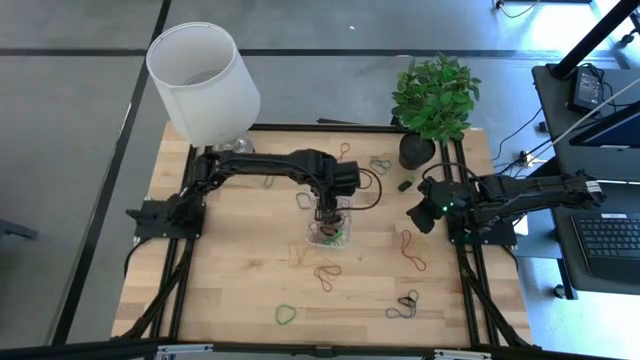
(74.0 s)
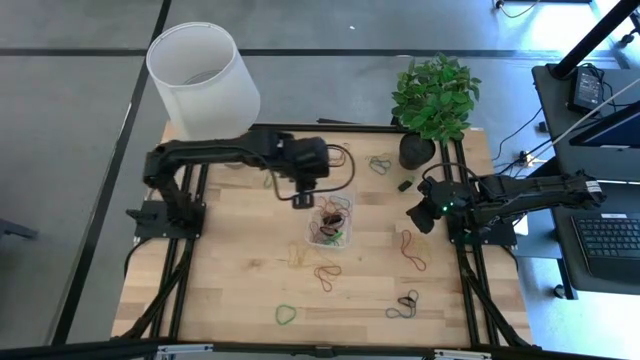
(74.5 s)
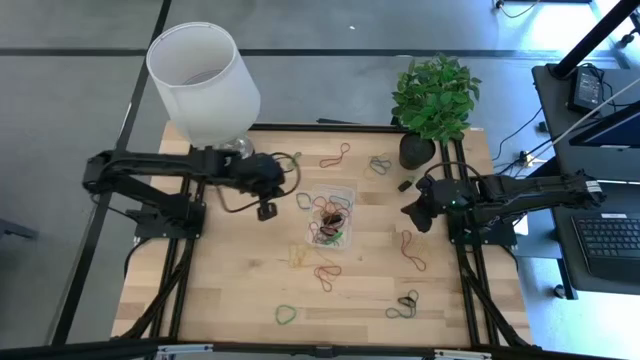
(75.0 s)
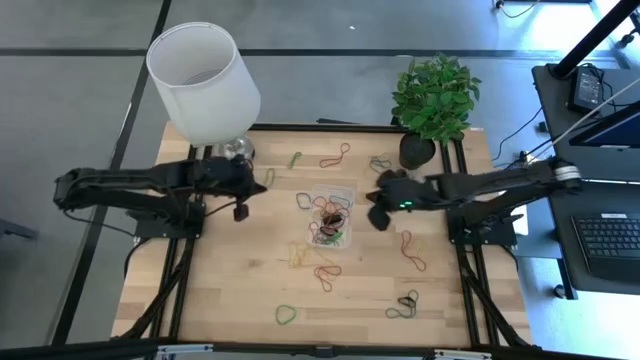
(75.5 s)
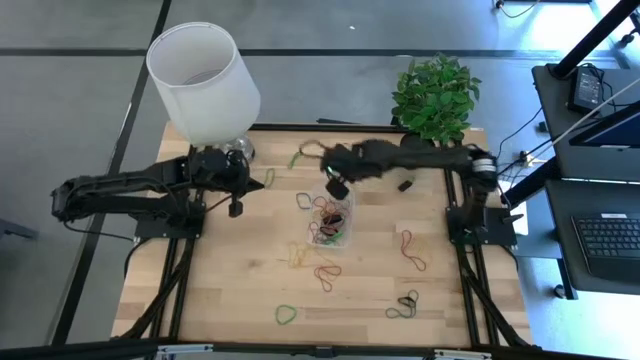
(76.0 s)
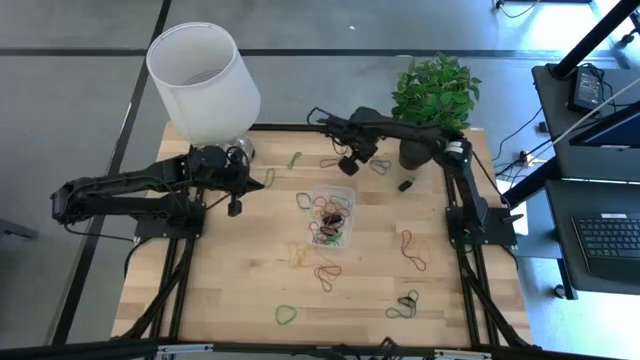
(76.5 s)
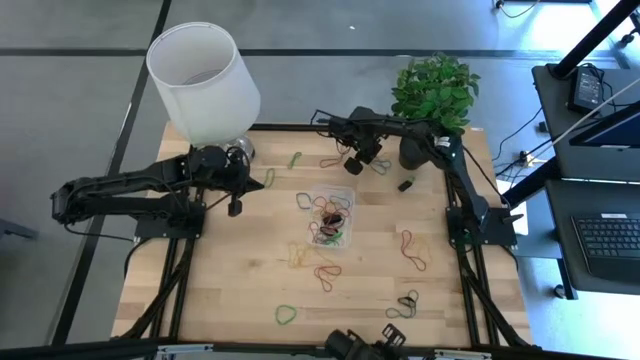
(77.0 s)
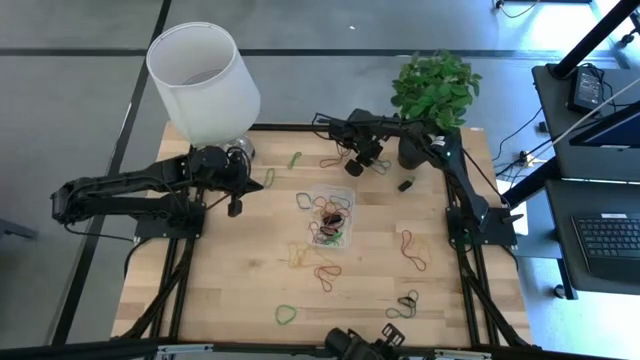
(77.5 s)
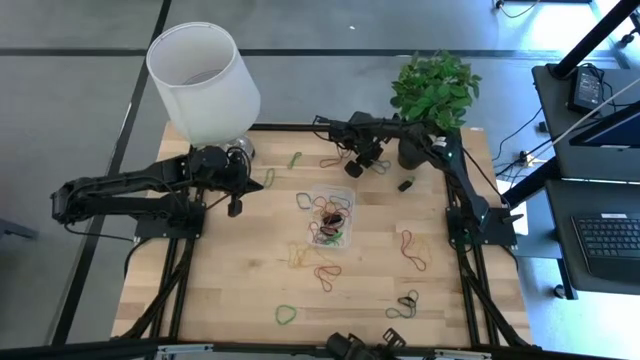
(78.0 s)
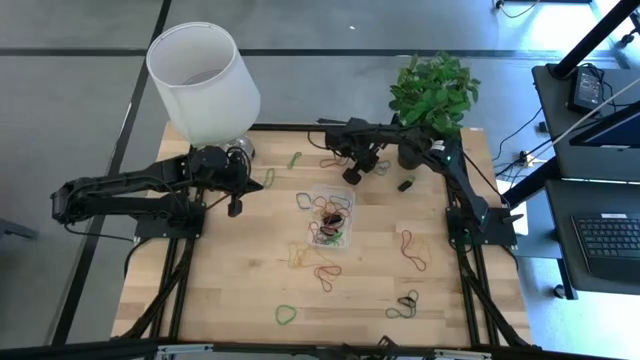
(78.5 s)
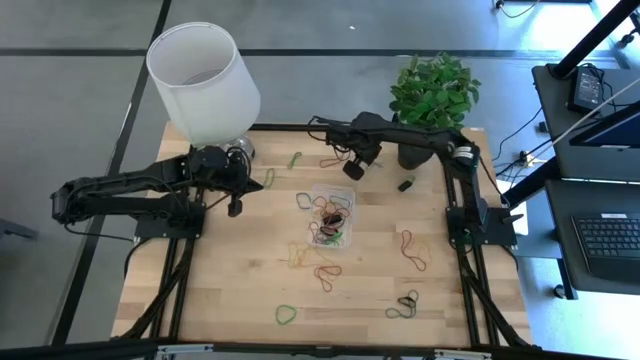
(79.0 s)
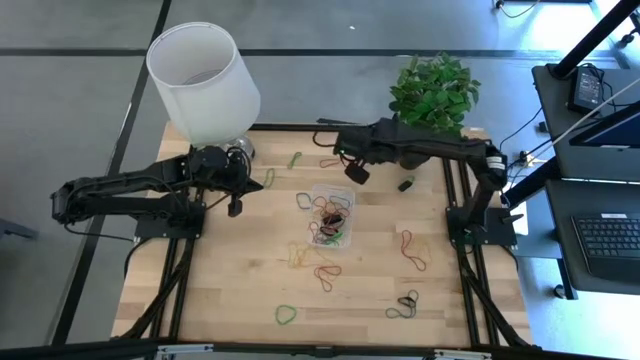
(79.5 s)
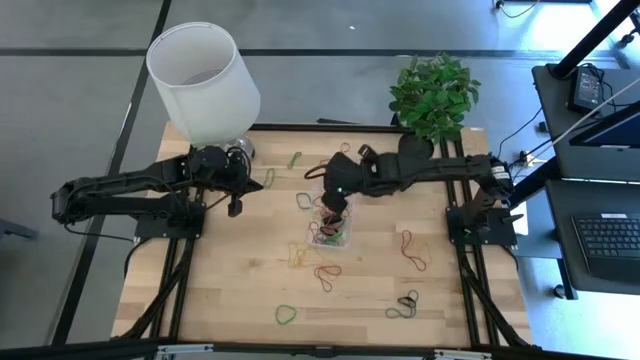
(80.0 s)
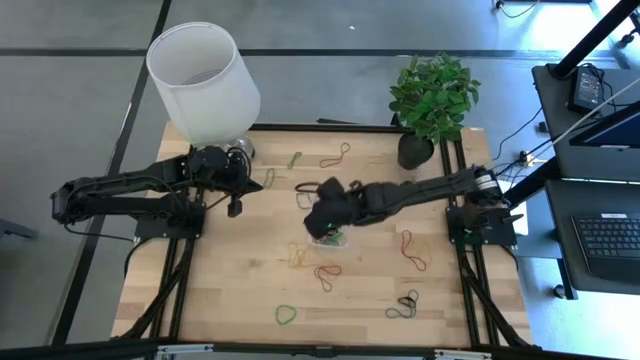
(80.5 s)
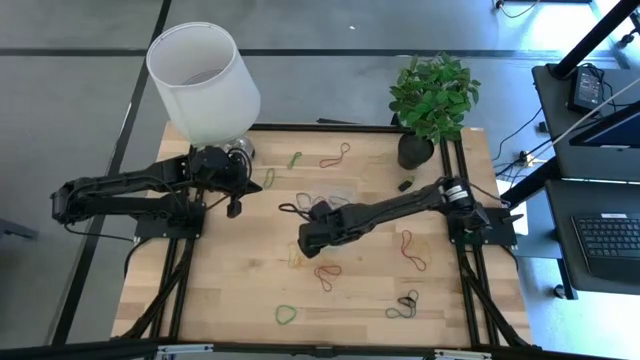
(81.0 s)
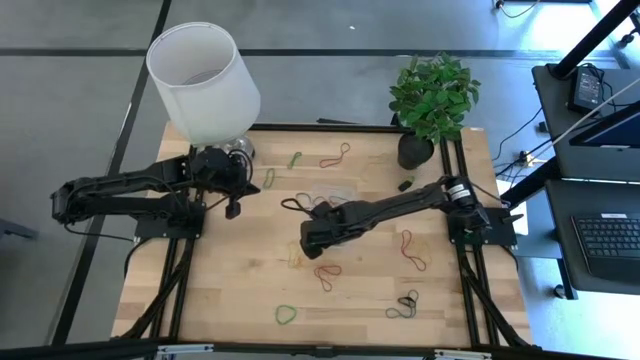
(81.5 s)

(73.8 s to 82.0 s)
Task: Pick and place rubber bands into bin
Put the top blue rubber band into the bin

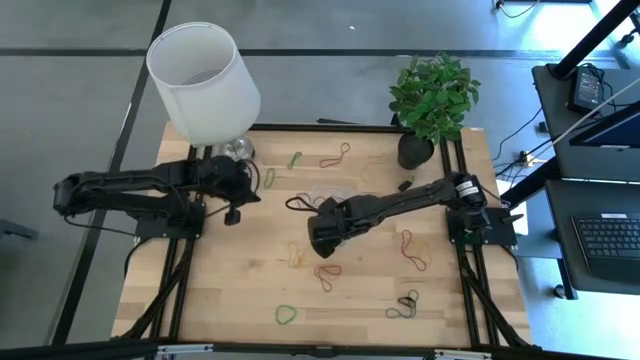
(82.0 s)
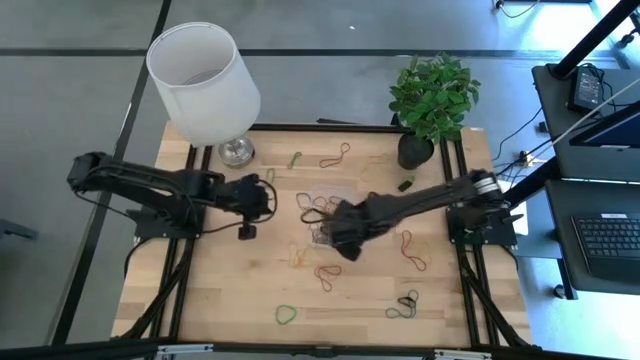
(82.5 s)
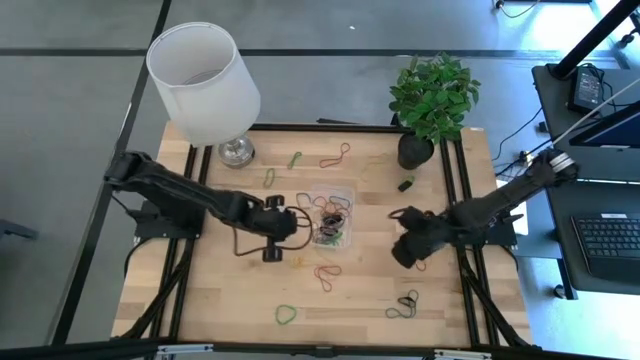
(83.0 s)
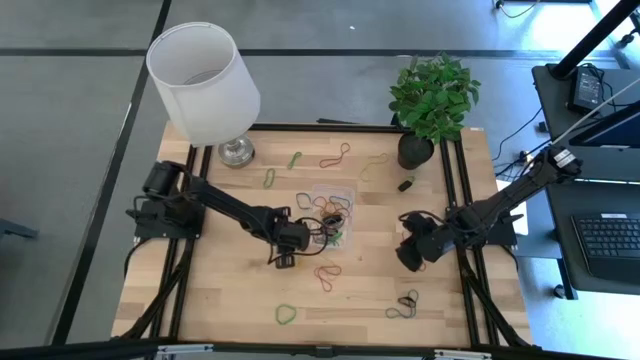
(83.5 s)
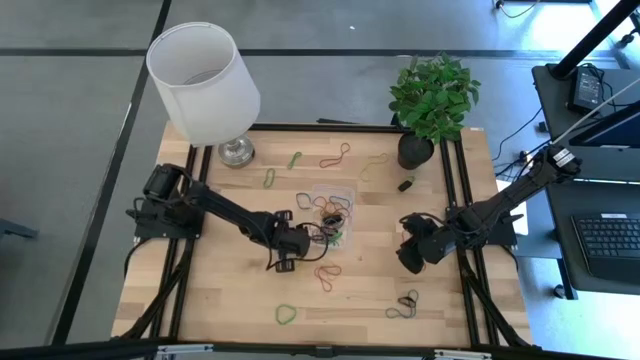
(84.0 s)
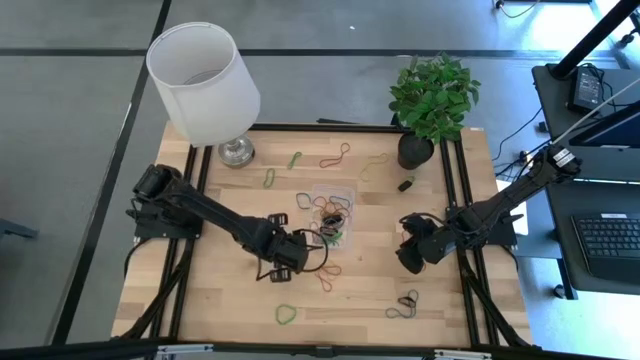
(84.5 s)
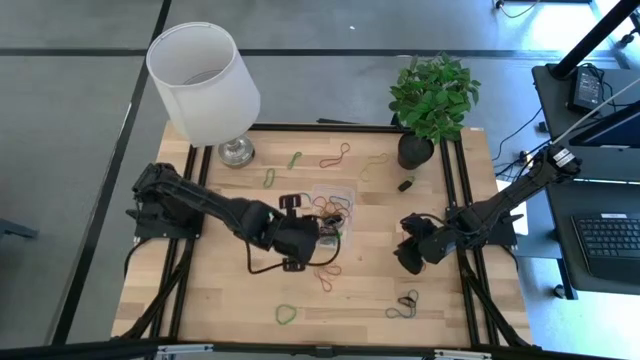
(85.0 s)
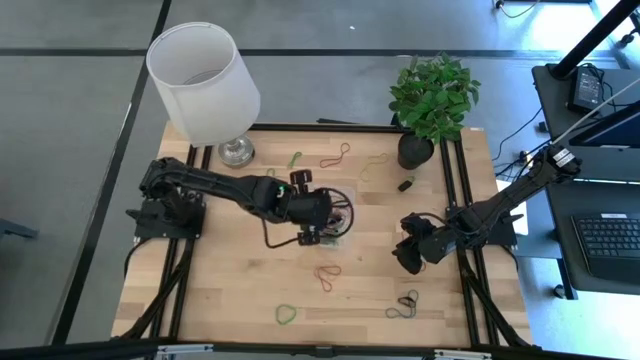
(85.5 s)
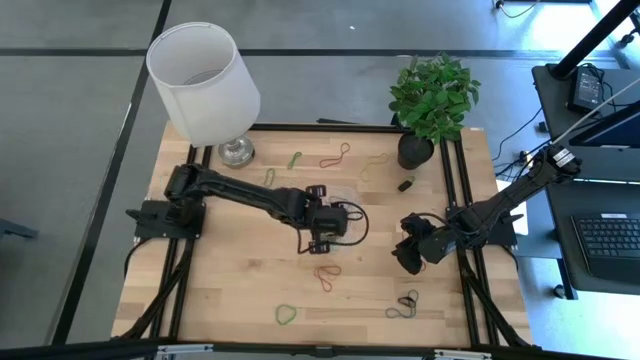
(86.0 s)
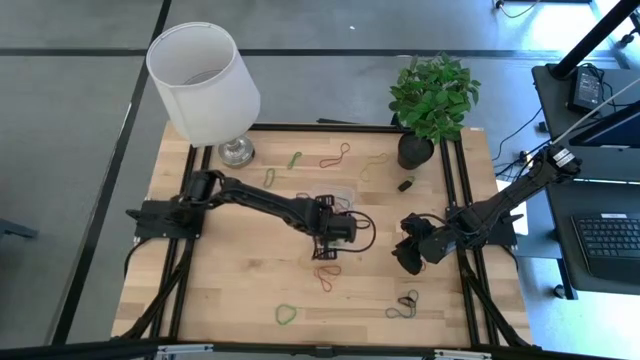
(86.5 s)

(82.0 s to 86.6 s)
Put the yellow rubber band into the bin

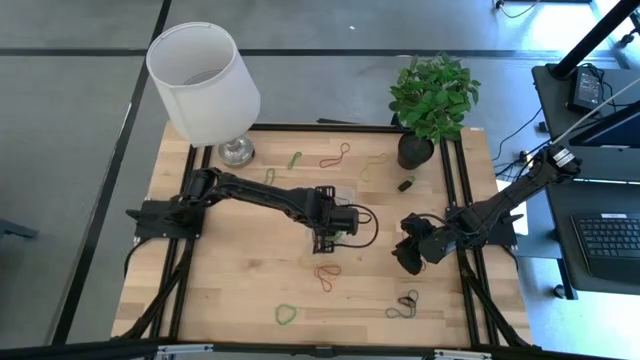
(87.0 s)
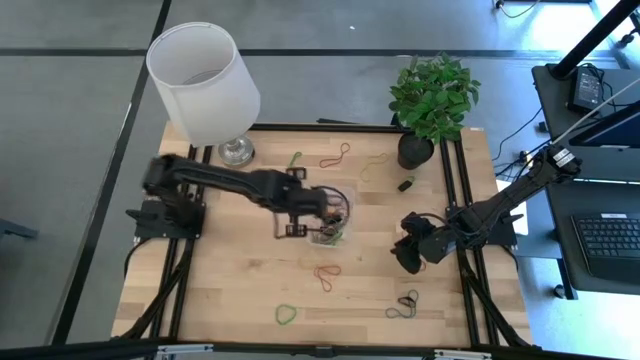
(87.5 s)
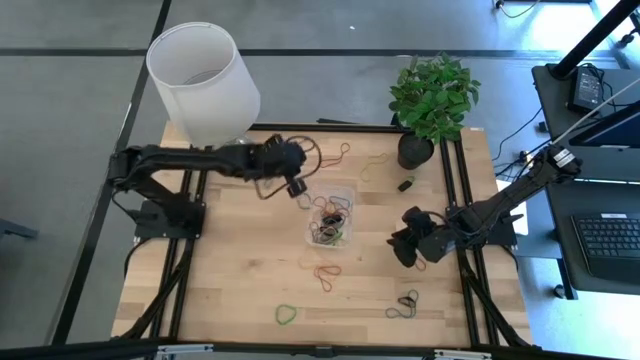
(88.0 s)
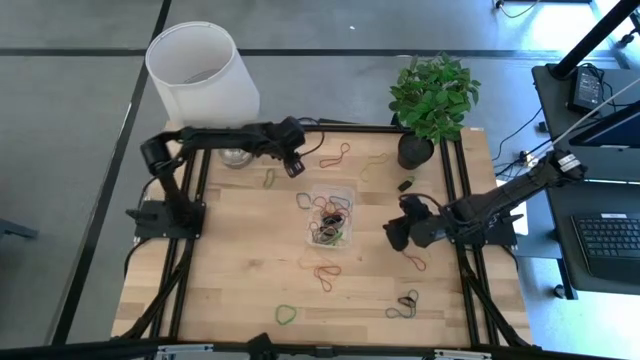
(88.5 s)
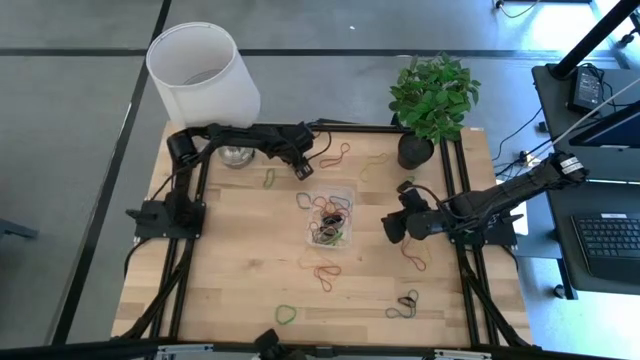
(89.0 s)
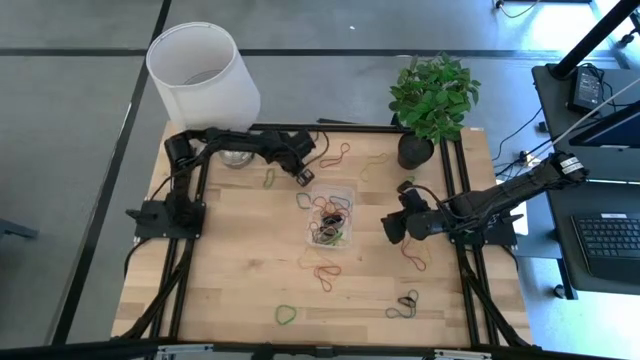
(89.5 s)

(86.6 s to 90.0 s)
Put the green rubber band into the bin

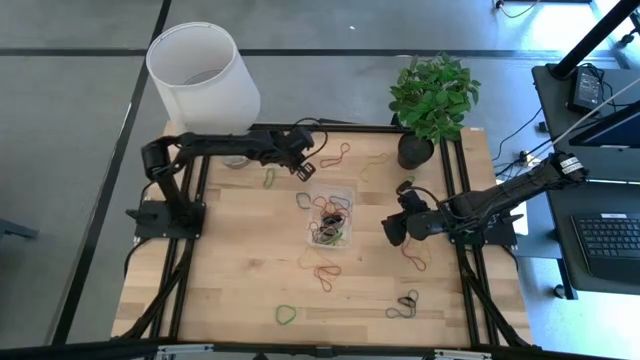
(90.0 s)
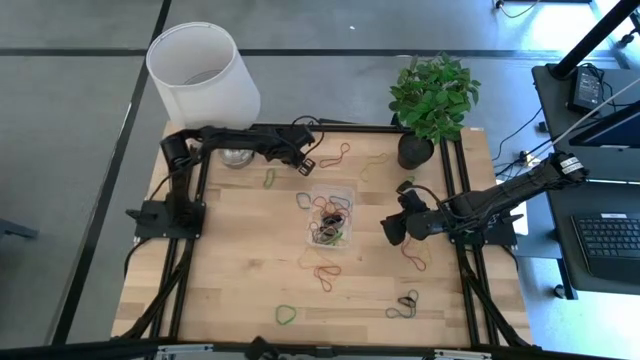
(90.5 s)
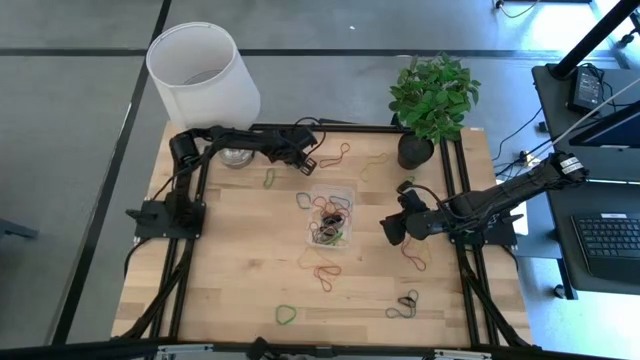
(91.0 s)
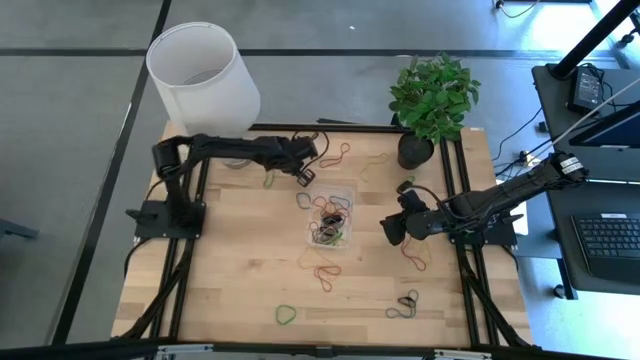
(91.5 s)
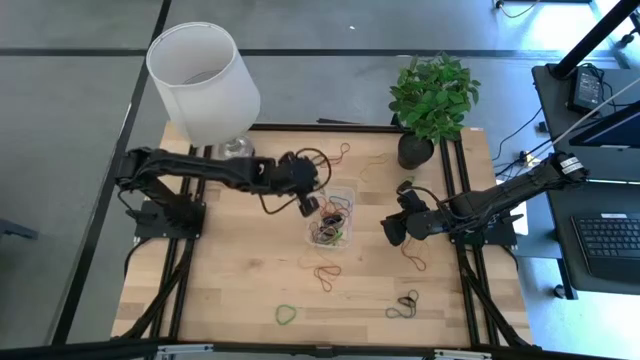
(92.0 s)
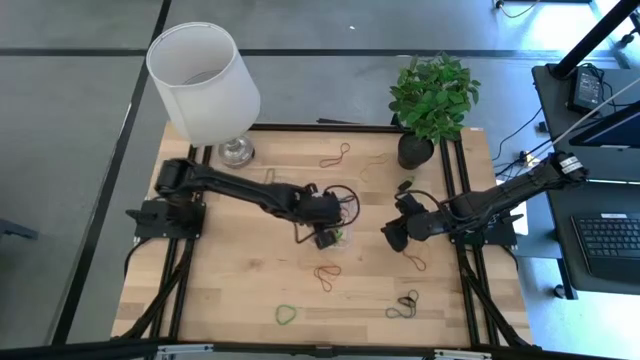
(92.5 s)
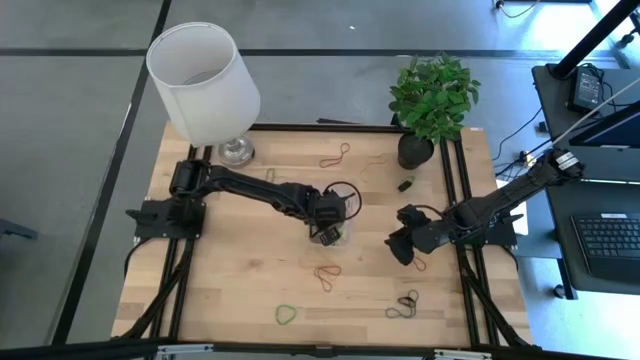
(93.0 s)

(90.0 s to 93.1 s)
Put the green rubber band into the bin

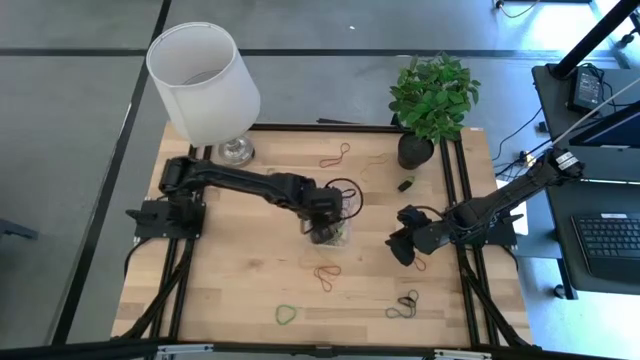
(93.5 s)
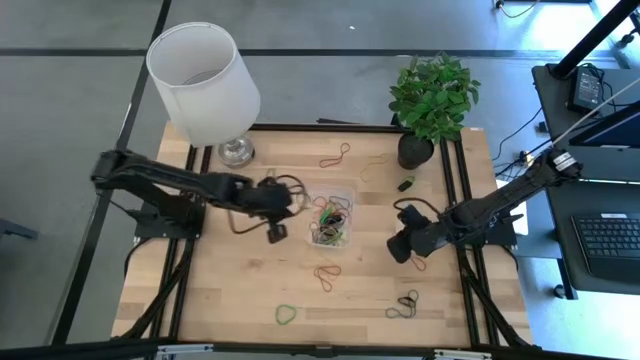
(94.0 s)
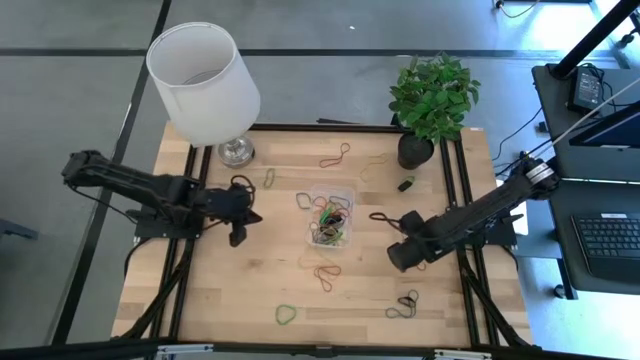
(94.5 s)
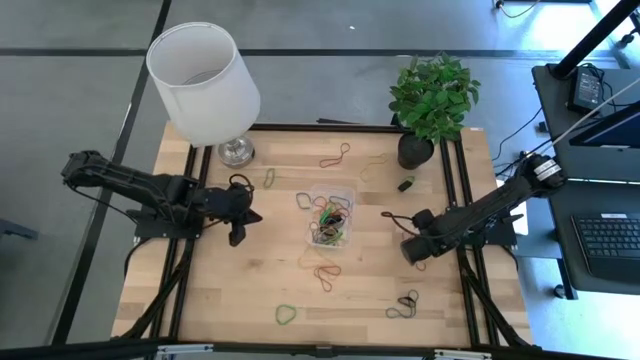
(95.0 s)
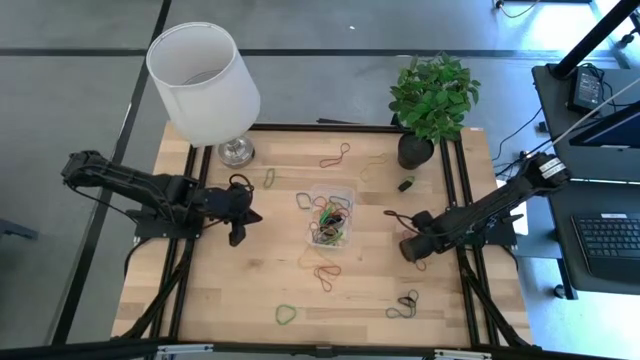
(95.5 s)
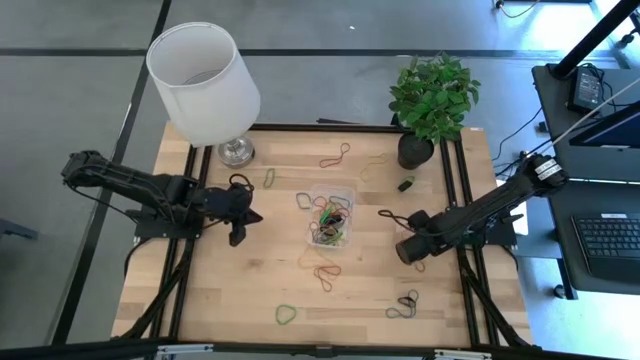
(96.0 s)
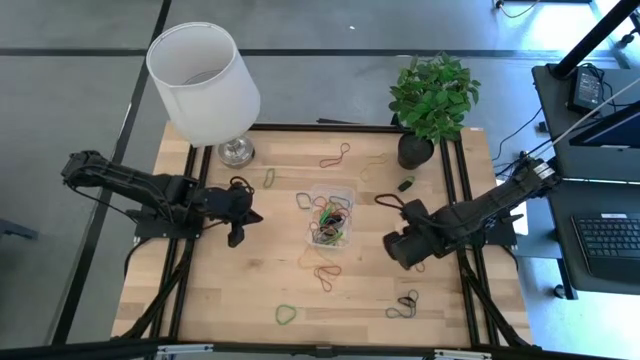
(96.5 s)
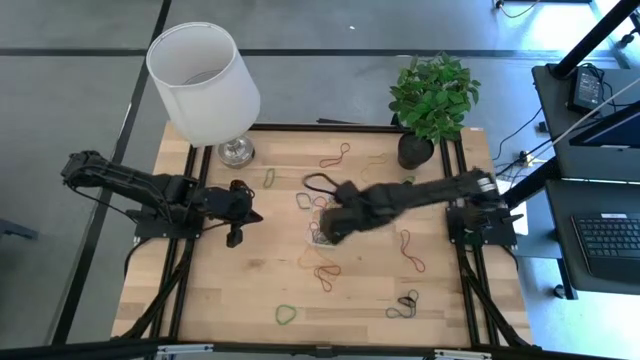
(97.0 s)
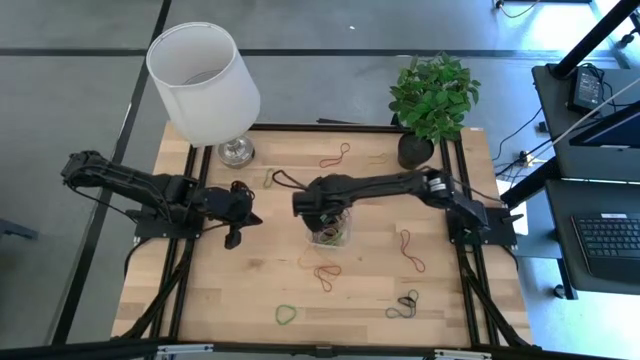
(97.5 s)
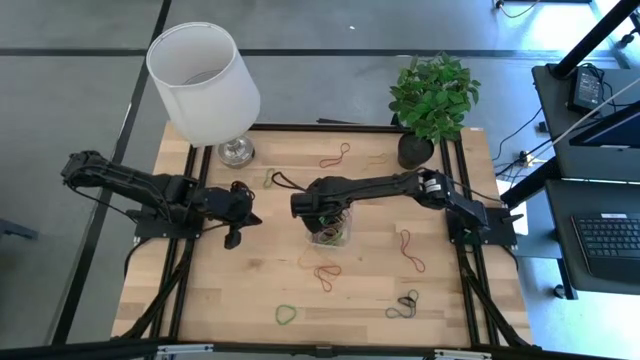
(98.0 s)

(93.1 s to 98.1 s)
Put the bottom right yellow rubber band into the bin
